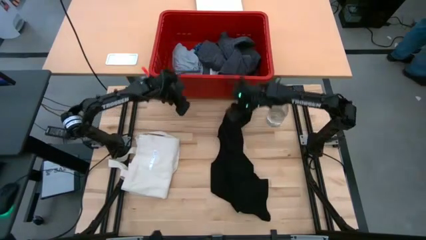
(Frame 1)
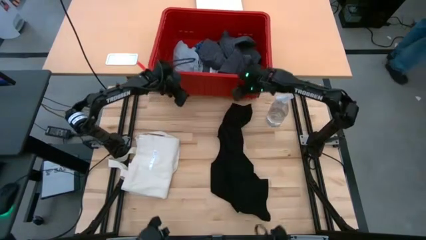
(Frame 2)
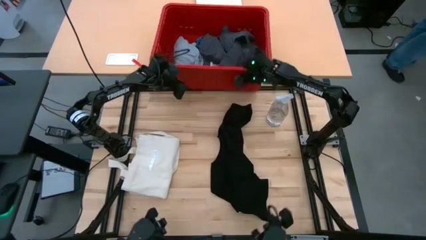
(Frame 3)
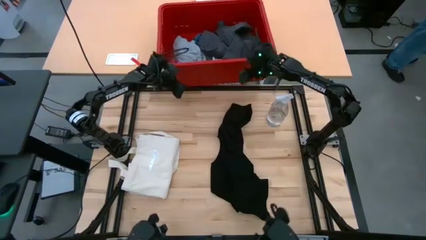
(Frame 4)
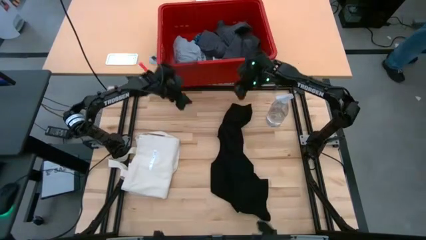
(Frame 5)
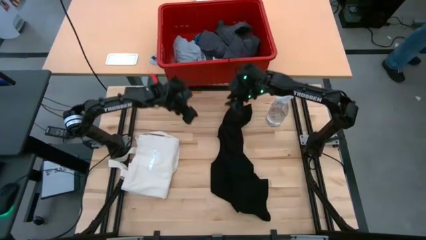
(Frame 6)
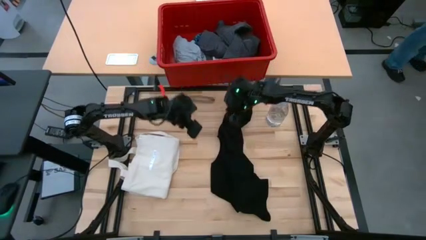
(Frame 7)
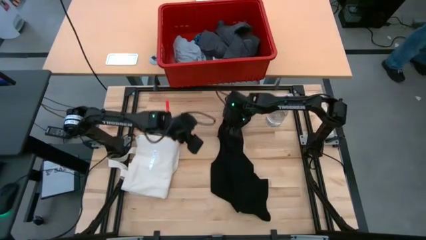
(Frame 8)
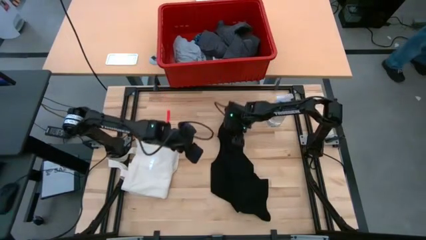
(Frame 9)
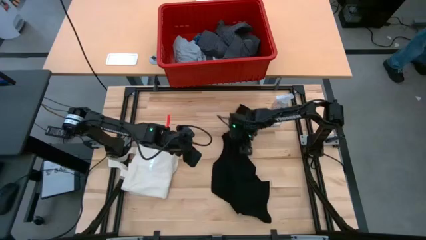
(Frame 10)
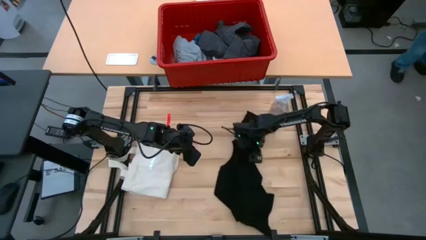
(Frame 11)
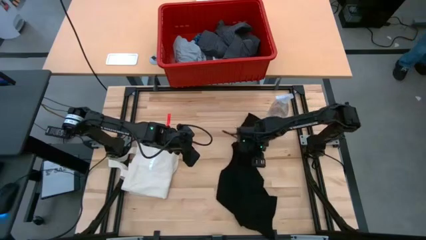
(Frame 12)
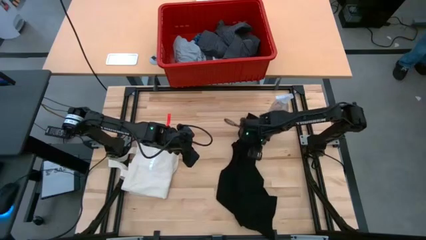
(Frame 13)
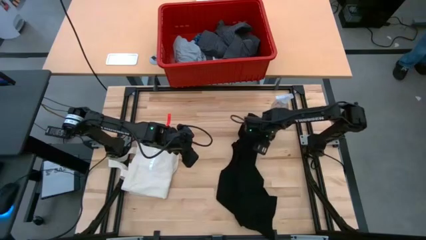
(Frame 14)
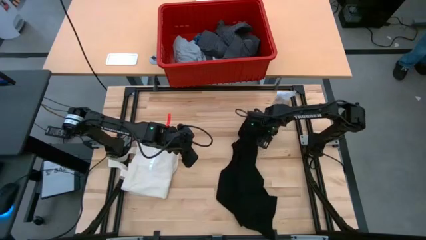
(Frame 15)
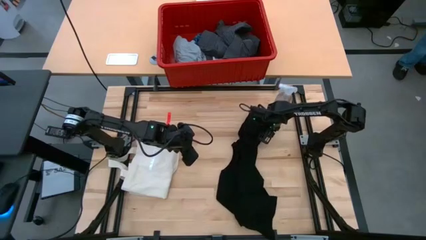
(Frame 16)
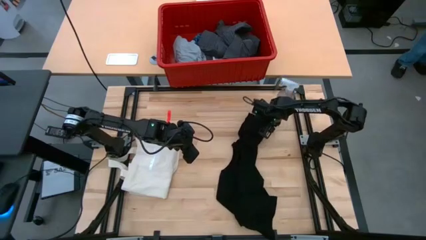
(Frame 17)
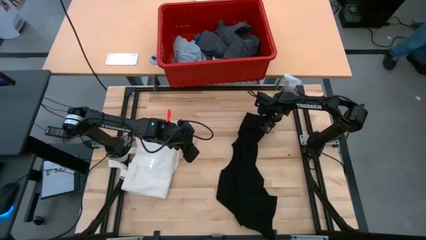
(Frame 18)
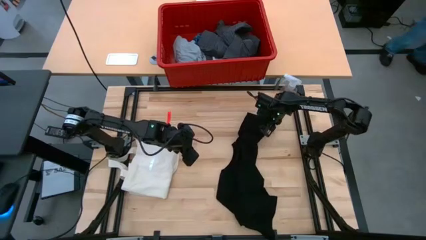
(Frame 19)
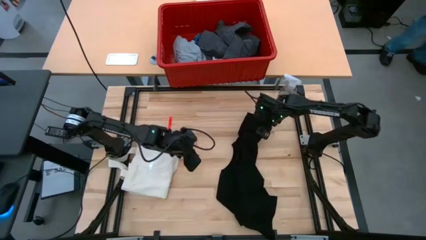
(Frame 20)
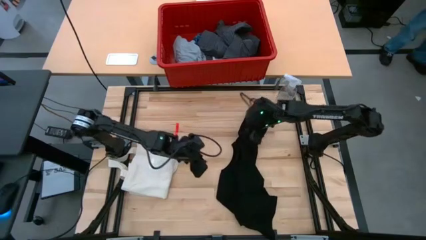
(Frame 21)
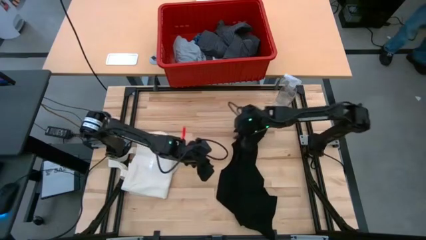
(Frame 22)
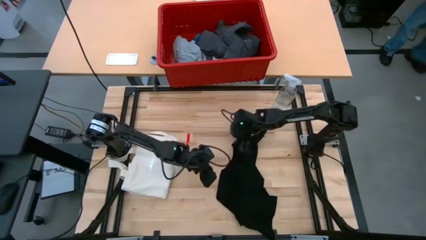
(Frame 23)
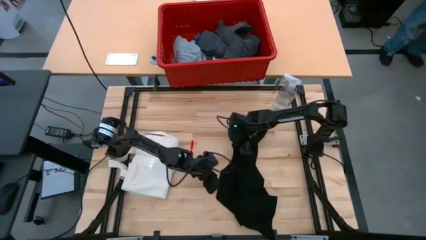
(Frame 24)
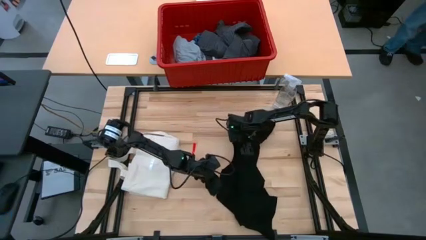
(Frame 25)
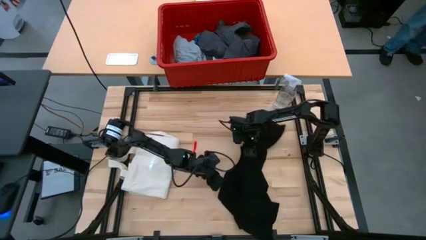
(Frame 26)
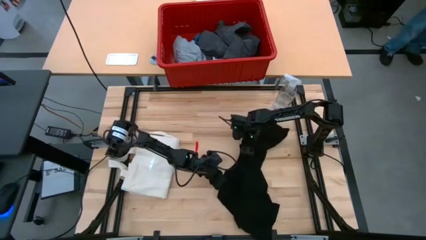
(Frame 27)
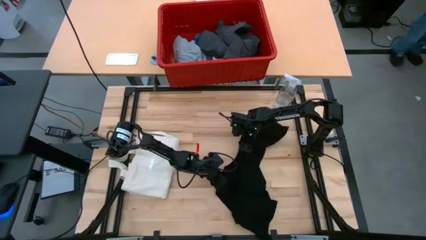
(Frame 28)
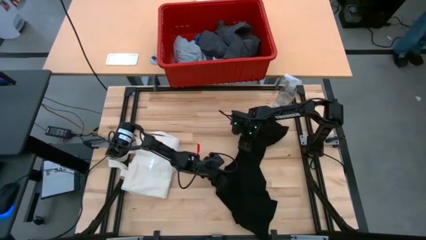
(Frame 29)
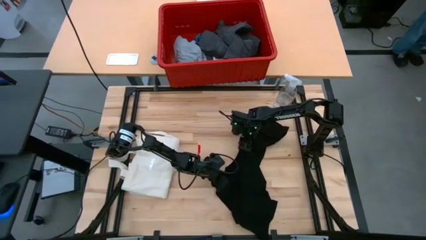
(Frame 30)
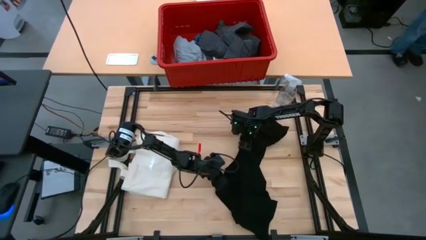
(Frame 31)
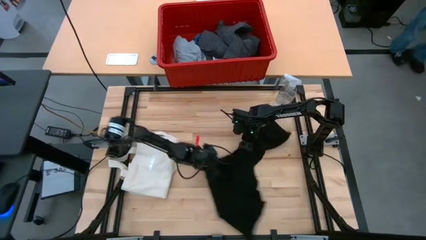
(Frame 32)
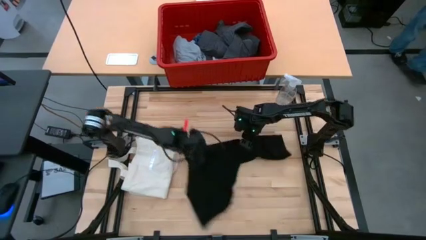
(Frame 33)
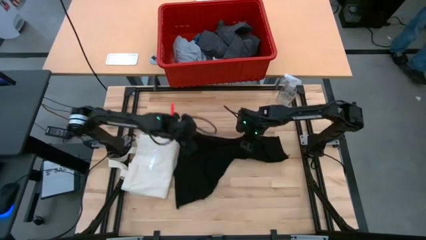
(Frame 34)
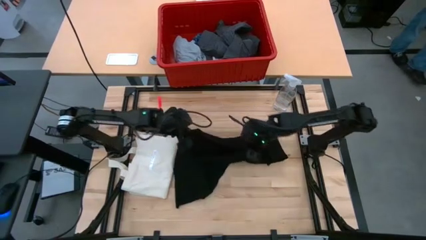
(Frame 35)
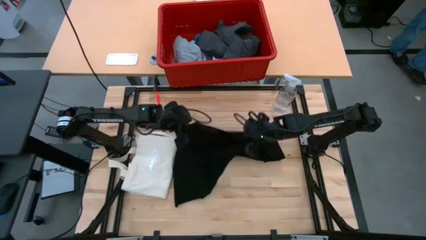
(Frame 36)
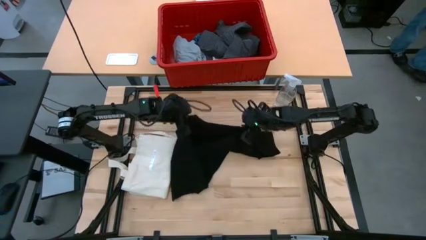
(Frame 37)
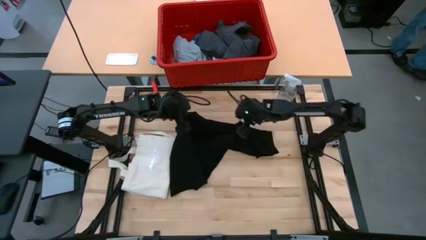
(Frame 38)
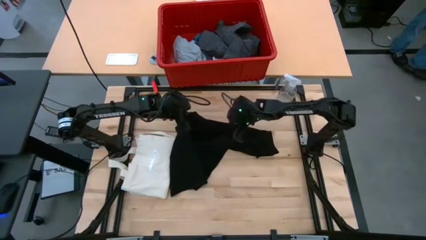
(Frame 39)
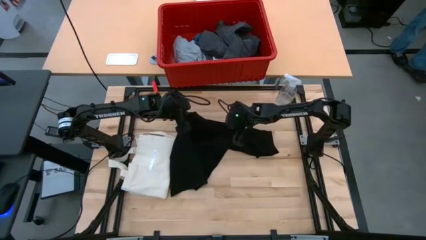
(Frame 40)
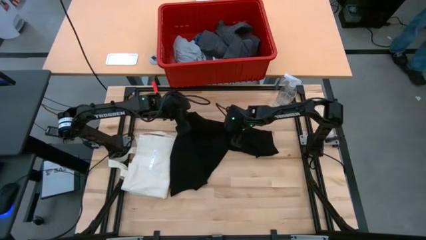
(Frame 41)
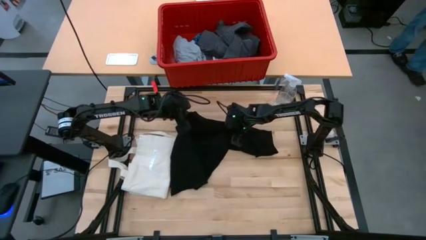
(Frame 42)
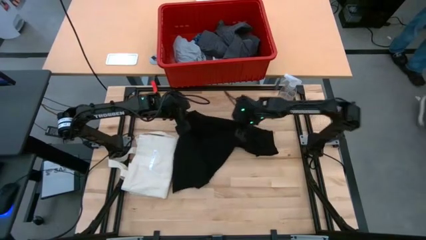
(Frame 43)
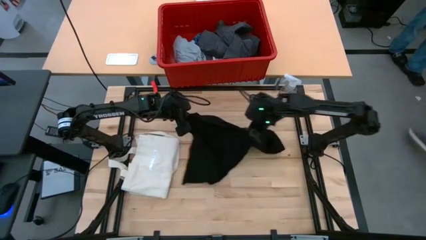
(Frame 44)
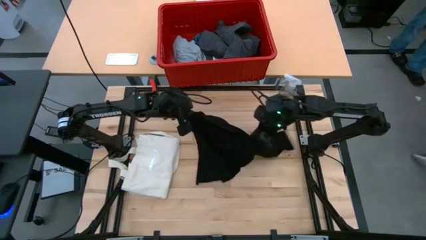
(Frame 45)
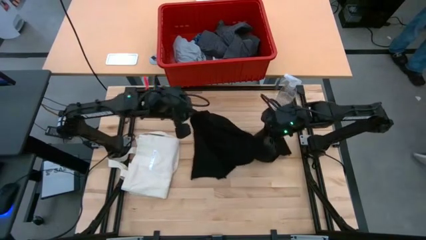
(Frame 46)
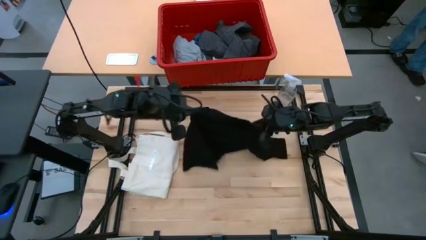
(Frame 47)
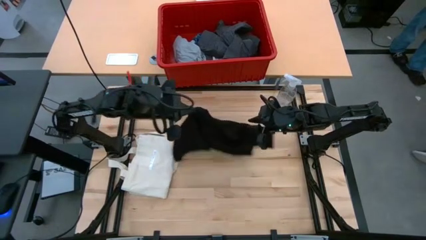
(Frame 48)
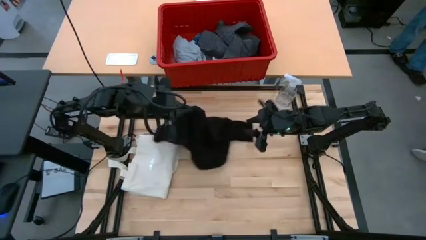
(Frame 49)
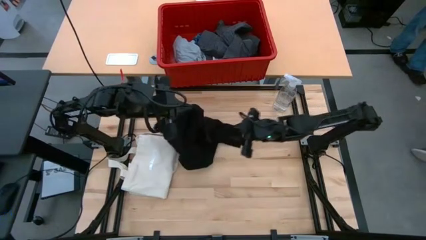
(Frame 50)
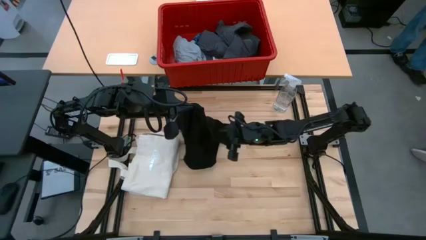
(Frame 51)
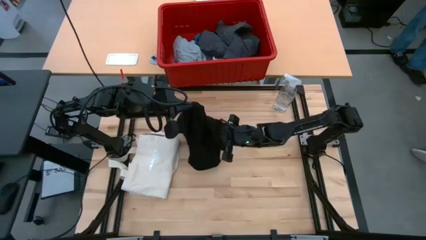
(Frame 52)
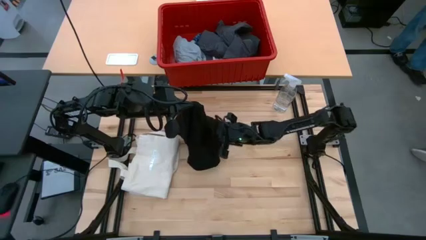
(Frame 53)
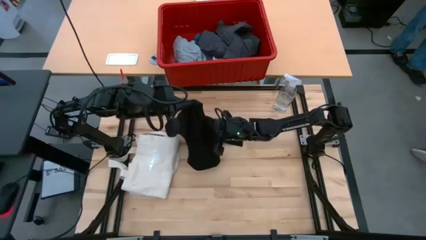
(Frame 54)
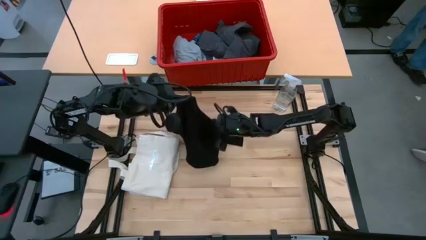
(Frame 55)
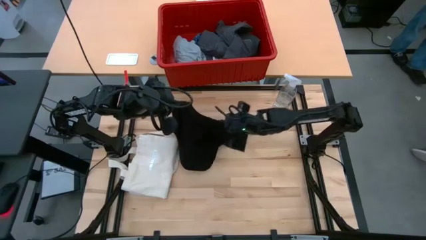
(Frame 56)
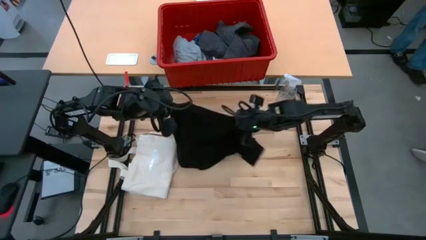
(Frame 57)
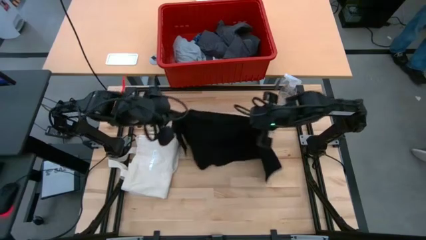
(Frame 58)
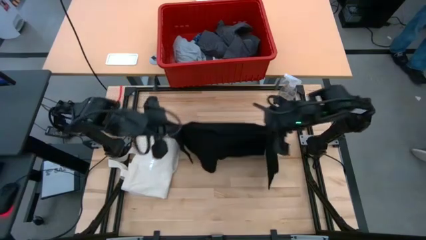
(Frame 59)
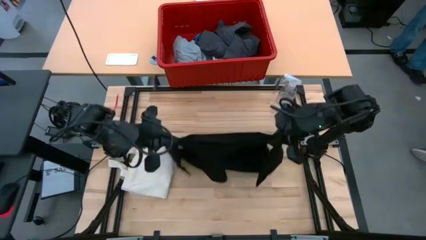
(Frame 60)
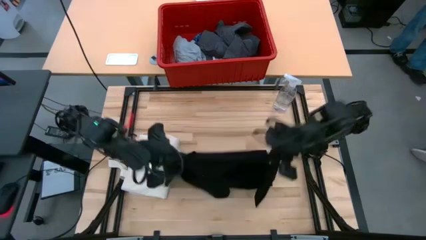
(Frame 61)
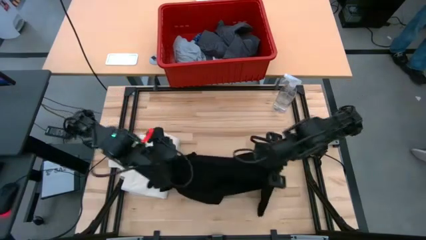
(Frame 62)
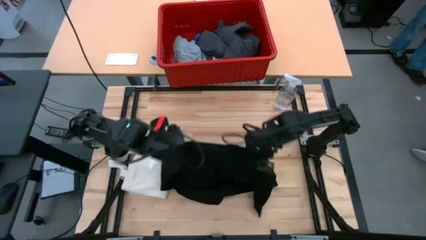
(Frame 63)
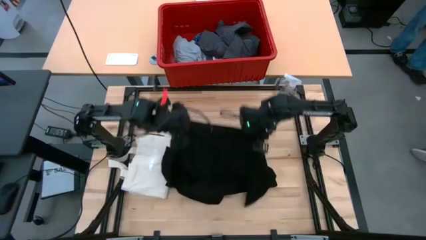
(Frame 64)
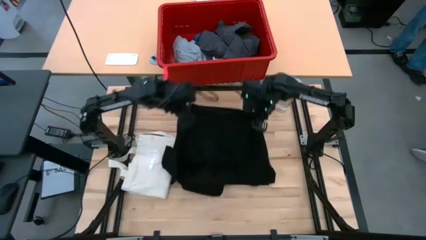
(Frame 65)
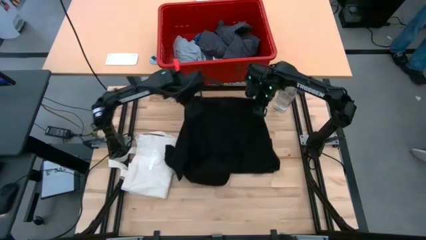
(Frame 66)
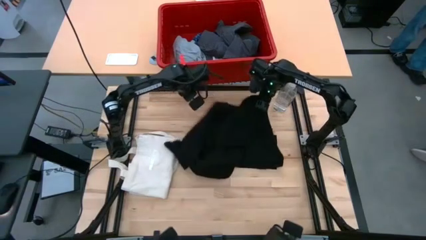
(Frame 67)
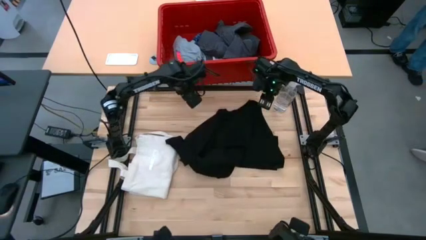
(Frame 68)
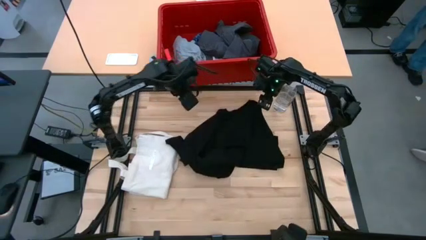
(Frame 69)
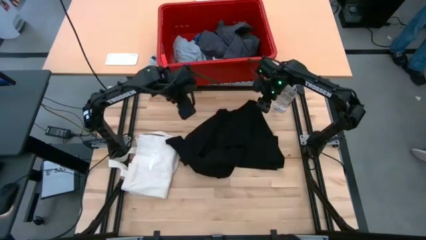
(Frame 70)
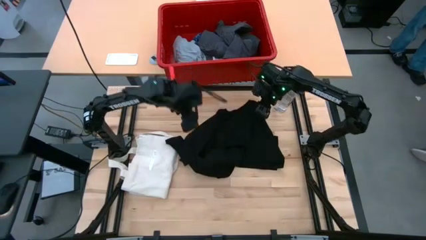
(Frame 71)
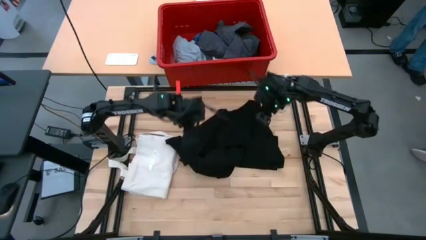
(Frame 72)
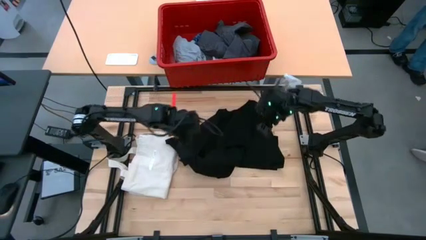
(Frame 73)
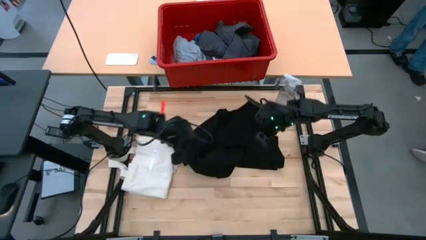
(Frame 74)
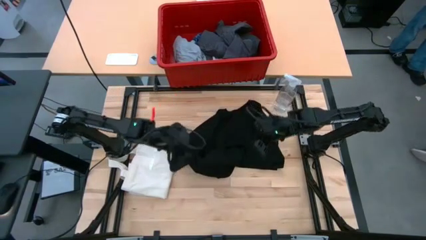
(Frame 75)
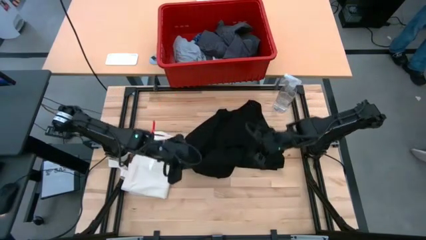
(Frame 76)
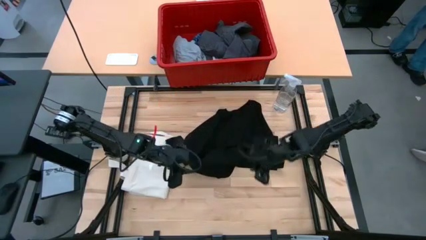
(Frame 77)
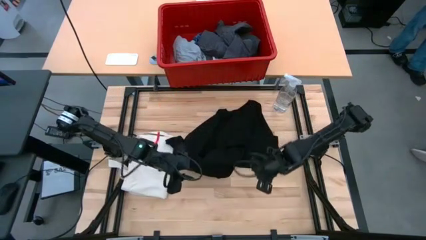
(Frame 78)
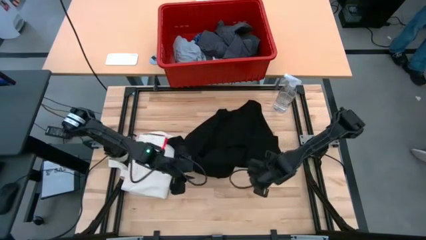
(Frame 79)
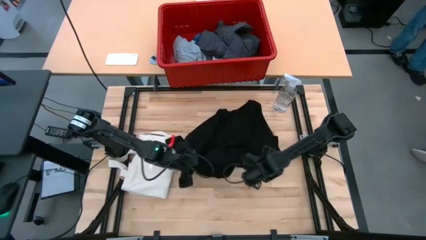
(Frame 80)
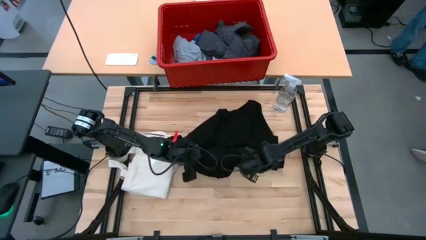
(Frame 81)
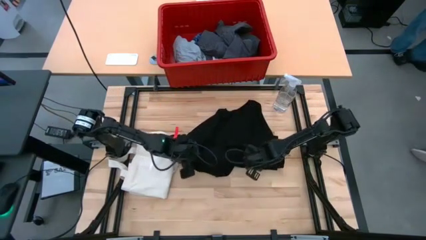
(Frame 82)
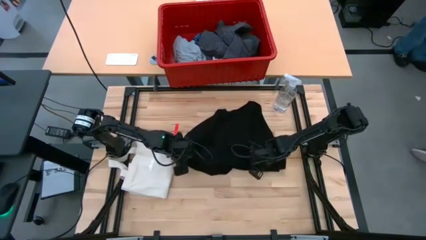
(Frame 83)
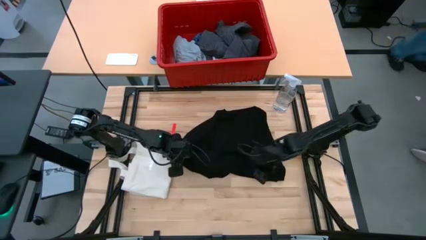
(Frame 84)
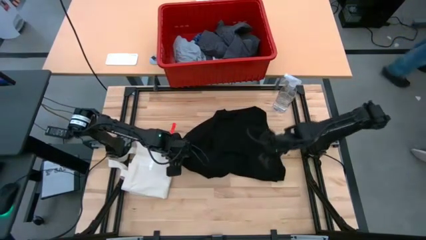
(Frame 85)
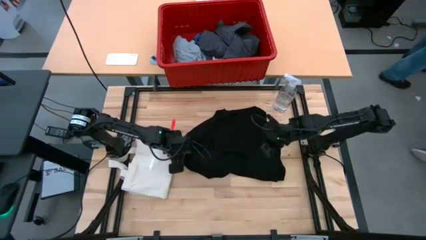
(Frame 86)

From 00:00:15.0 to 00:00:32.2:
Task: Fold Laundry from Bin
Fold the black shirt
